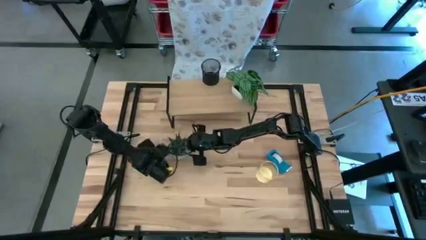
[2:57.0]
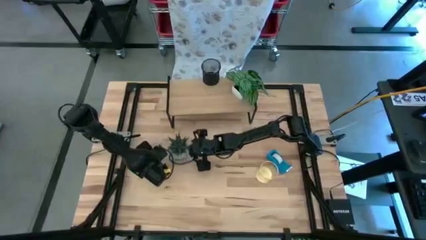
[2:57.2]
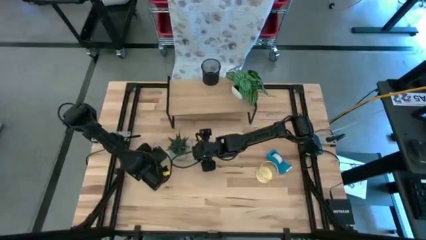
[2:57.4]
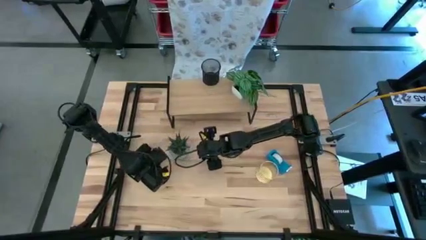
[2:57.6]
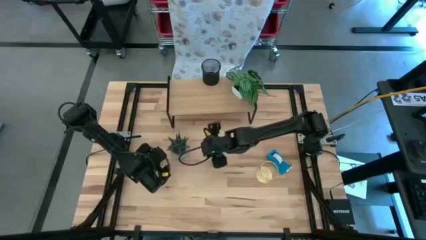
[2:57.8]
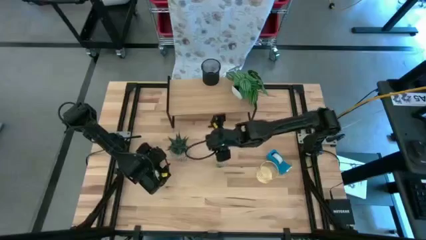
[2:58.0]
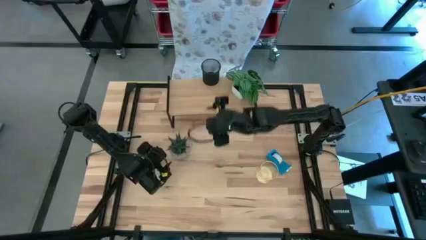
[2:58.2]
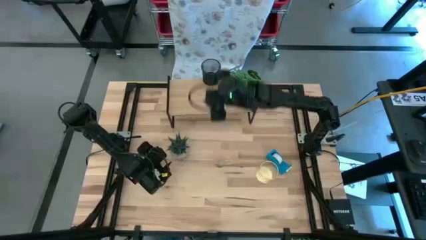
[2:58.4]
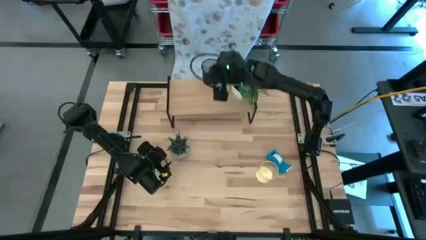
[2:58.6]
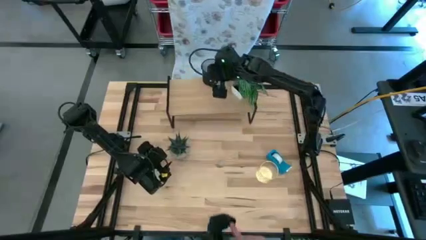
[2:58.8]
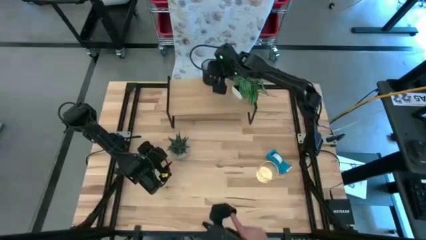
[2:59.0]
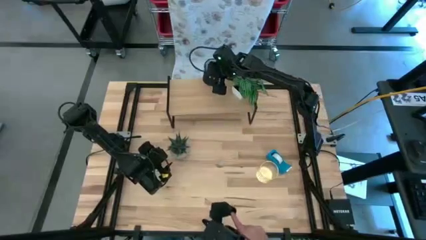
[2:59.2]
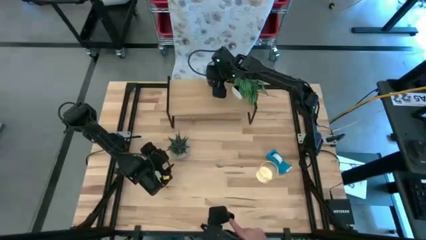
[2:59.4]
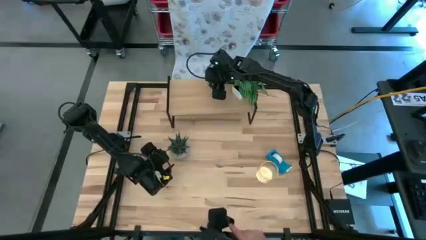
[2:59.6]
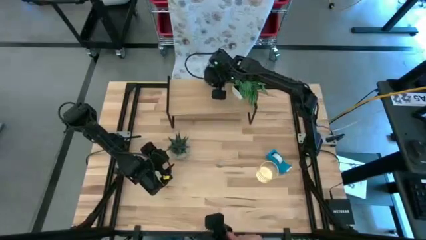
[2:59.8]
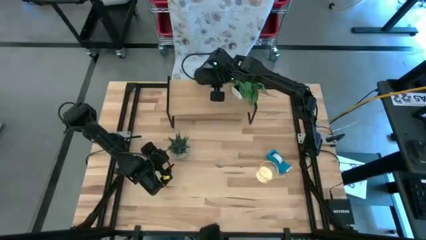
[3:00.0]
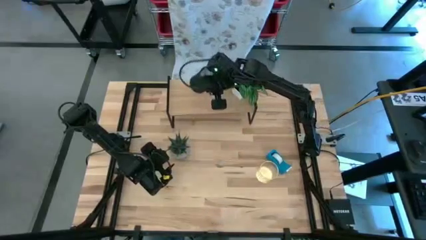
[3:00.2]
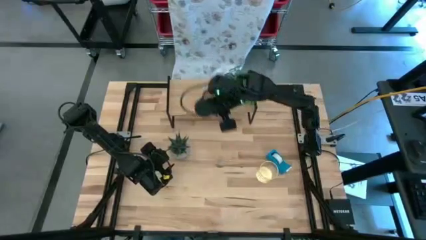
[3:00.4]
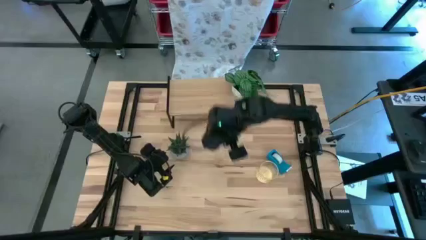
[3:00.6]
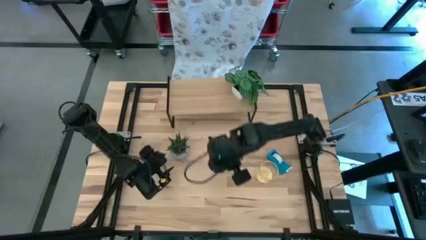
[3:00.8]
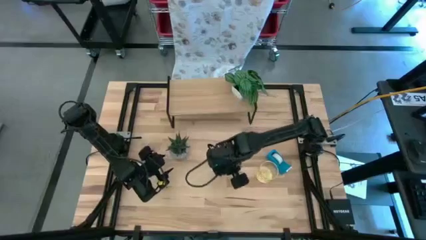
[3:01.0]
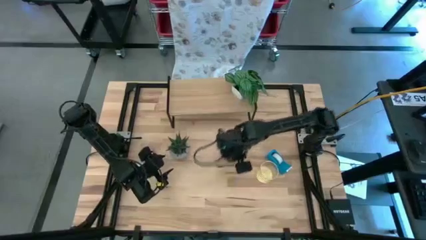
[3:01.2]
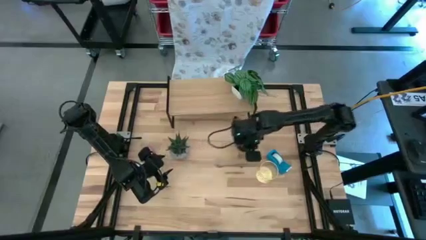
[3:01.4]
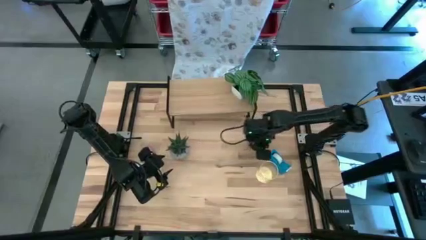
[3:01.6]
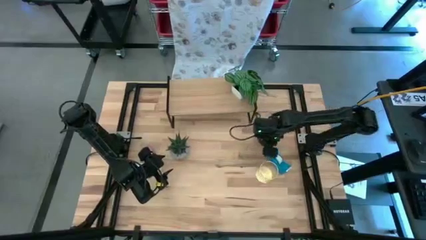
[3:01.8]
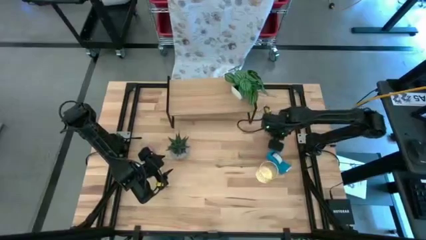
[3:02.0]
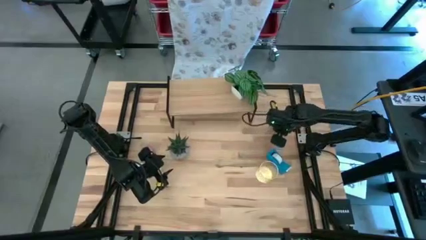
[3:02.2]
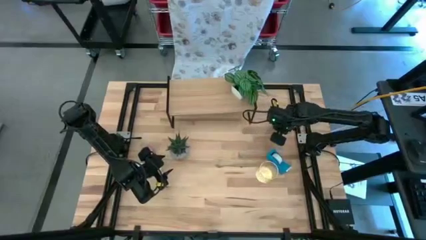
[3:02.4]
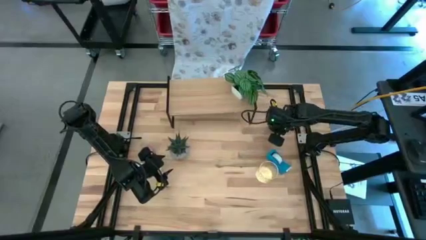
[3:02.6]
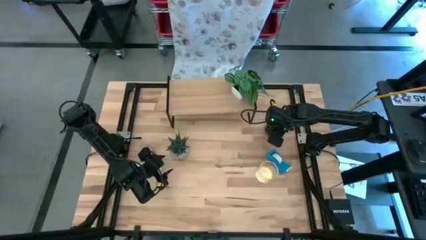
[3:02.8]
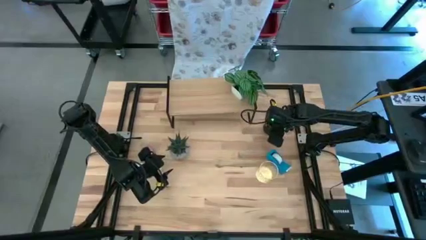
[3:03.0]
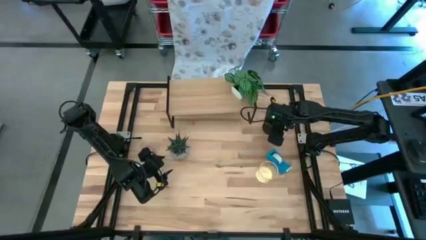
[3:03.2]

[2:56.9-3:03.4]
Task: Stock shelves
Remove the black pen holder on the shelf

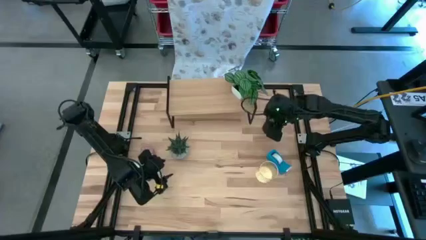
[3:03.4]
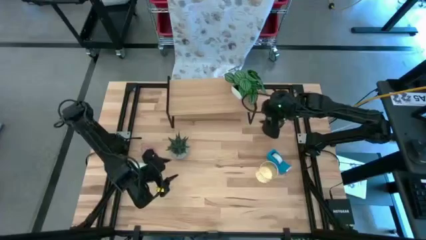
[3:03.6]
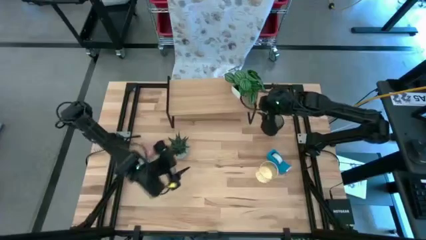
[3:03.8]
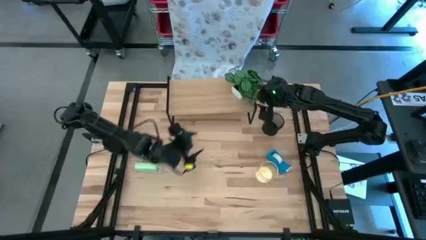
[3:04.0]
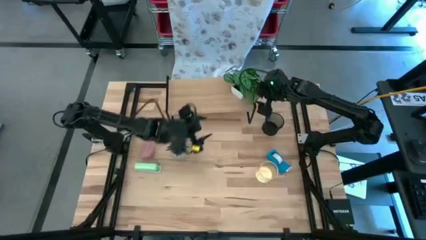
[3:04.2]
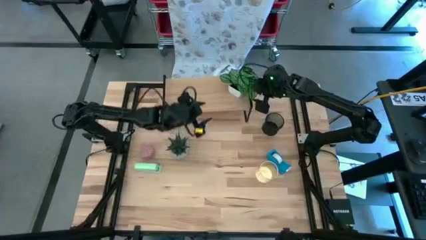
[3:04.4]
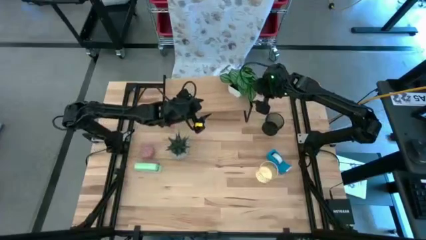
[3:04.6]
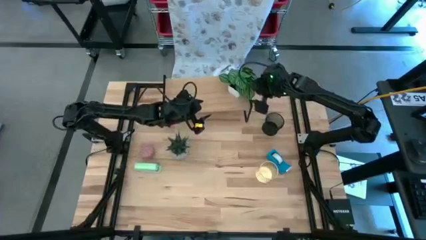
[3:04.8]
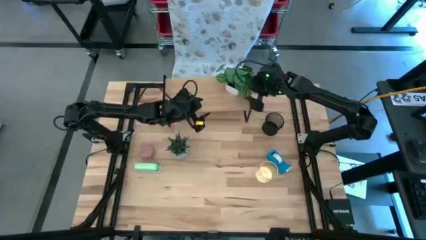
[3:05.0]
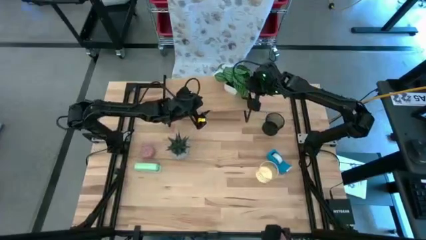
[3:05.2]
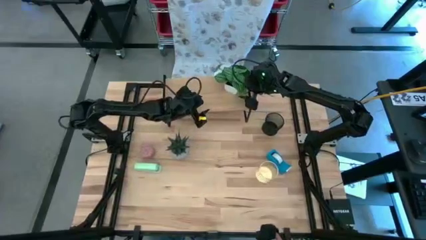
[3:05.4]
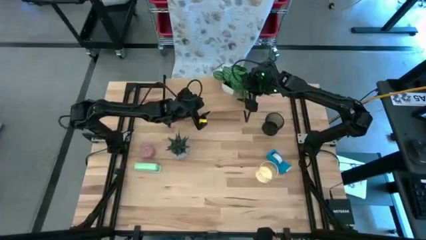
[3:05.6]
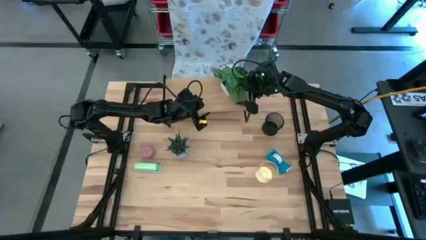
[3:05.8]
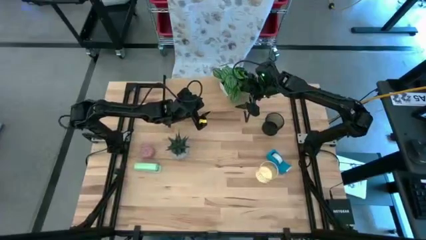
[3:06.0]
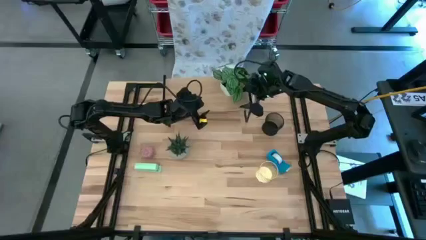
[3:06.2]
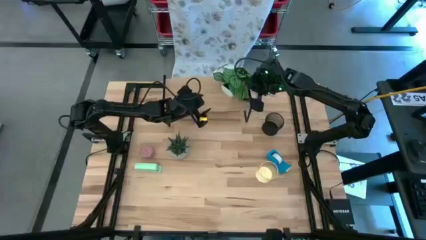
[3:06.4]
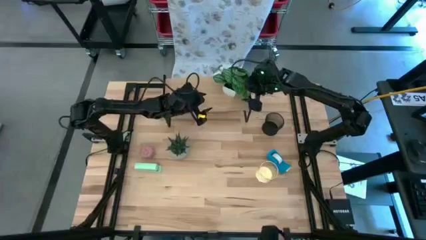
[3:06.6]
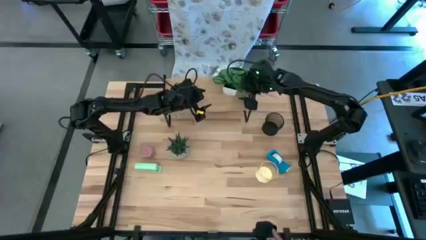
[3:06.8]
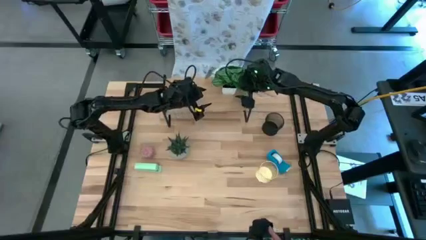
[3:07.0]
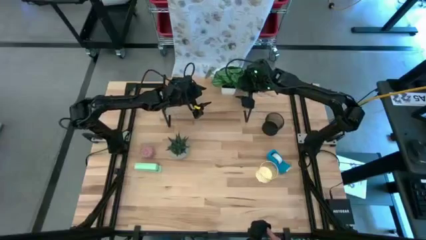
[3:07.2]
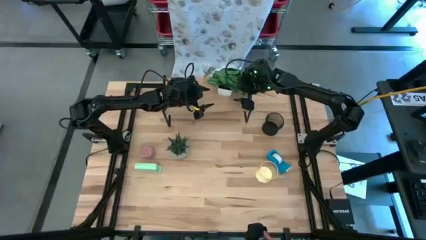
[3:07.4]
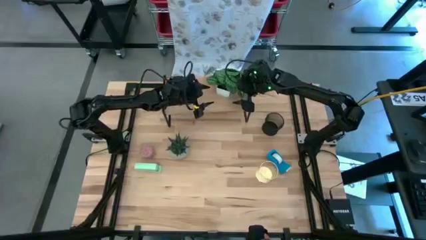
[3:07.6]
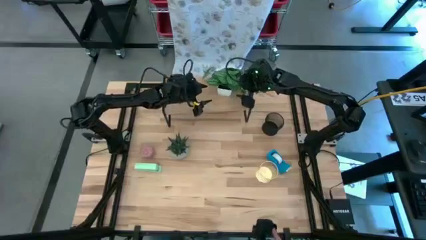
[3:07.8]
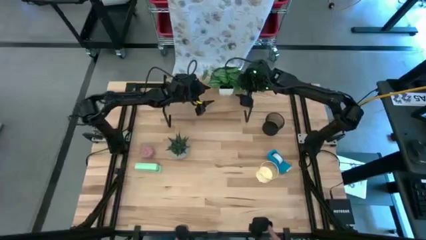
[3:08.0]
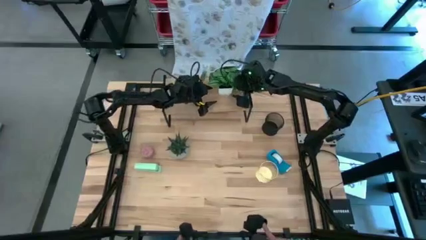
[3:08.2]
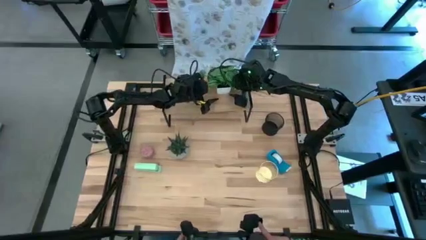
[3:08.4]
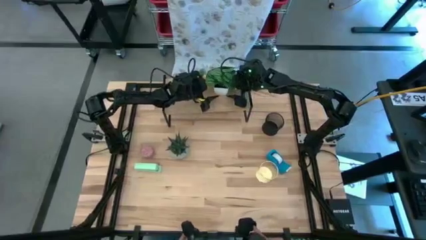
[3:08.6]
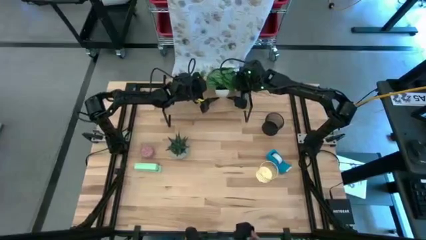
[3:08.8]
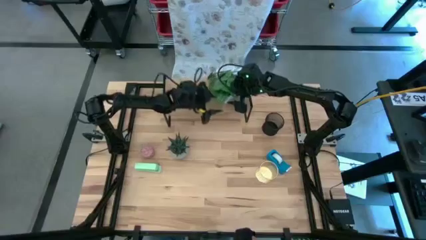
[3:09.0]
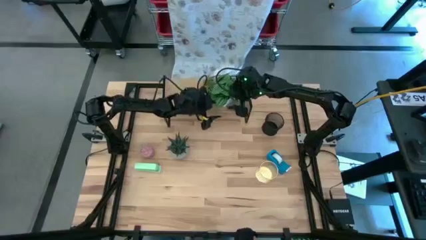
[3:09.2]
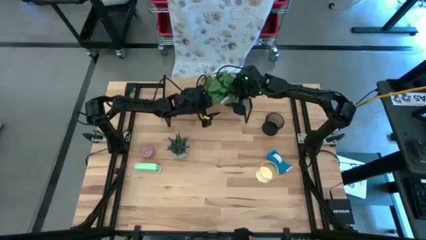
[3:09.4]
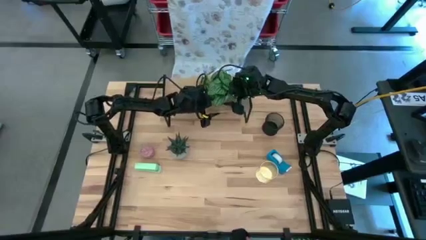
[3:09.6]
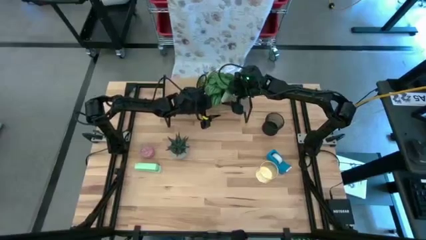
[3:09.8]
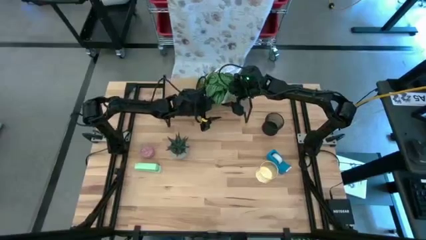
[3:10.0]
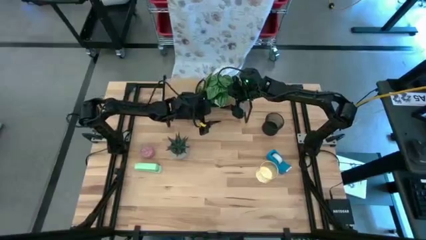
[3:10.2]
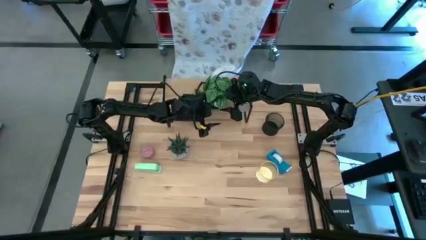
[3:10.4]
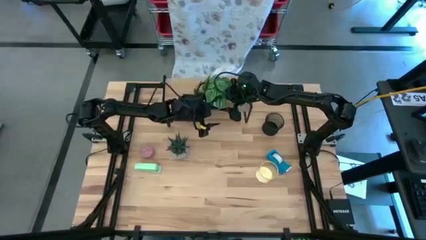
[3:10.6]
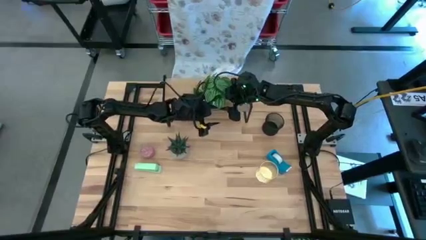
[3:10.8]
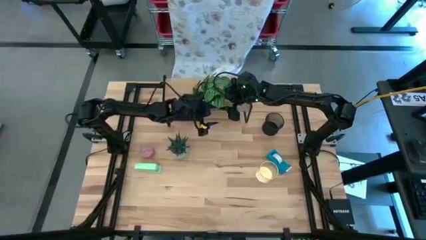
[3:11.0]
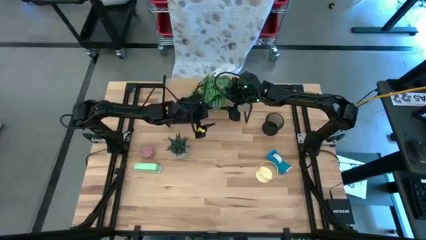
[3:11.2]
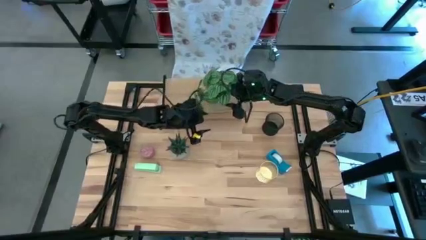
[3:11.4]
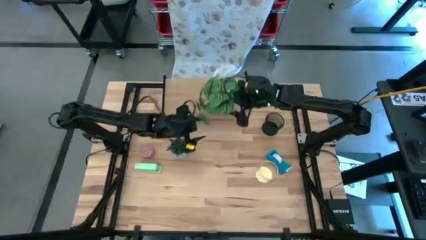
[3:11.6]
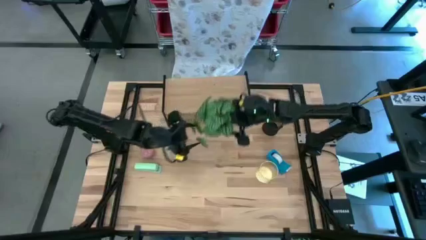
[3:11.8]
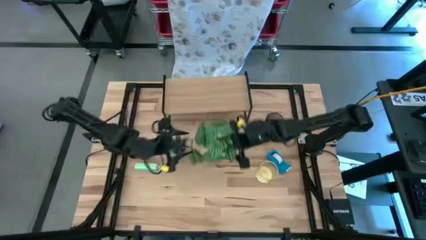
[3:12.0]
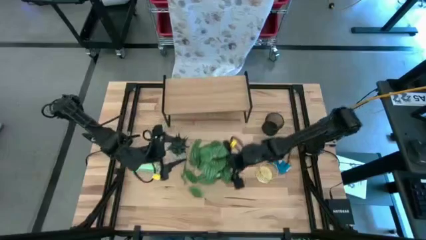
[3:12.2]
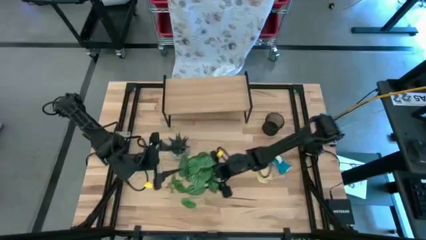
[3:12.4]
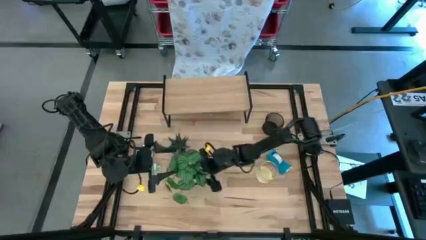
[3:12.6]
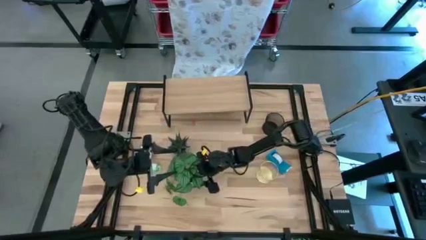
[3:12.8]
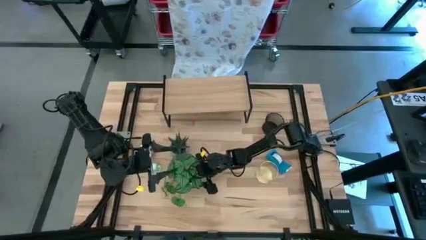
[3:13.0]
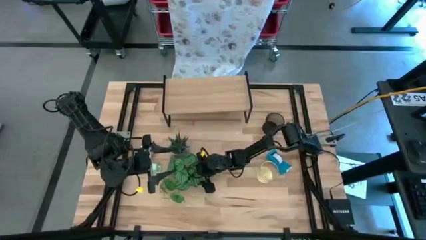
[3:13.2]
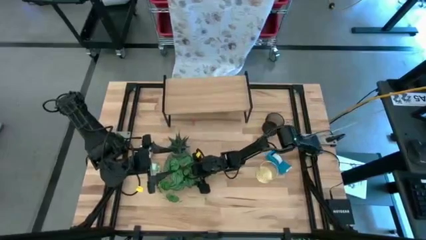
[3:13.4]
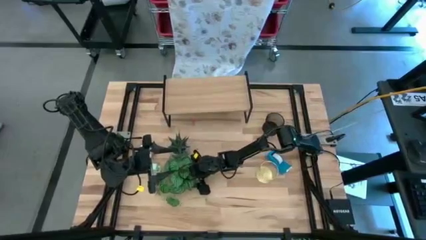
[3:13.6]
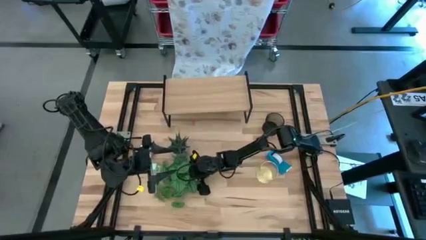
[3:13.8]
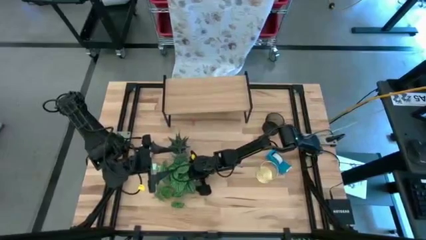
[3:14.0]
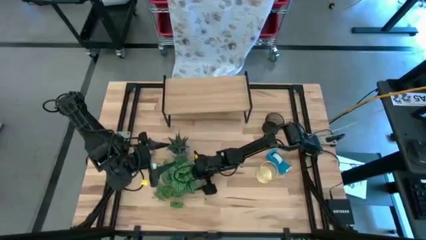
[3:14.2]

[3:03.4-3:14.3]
Remove the potted plant on the shelf
